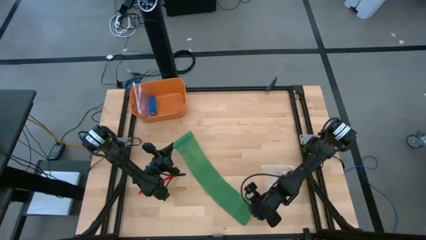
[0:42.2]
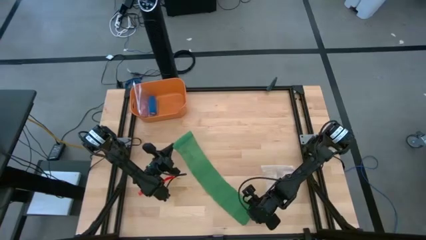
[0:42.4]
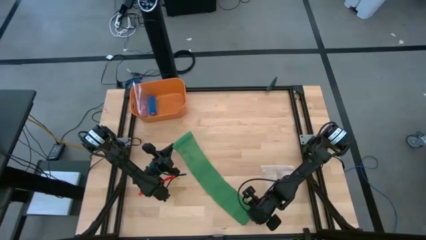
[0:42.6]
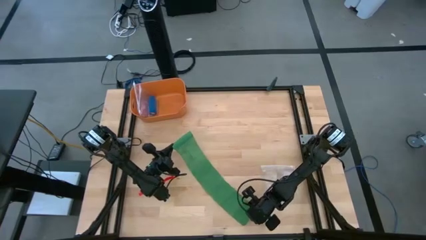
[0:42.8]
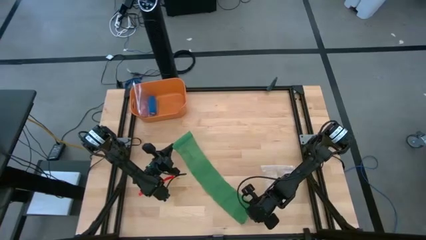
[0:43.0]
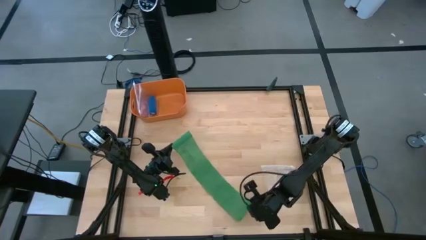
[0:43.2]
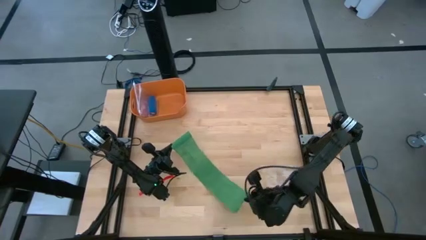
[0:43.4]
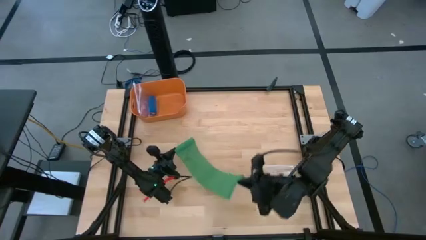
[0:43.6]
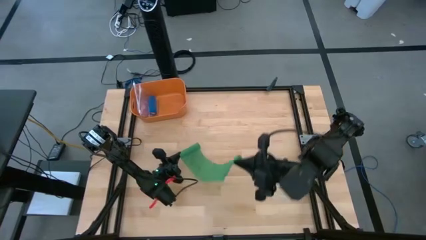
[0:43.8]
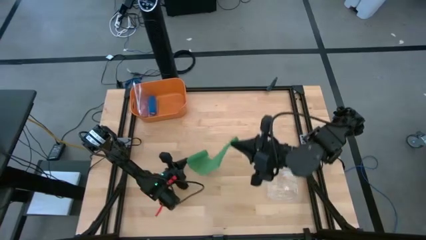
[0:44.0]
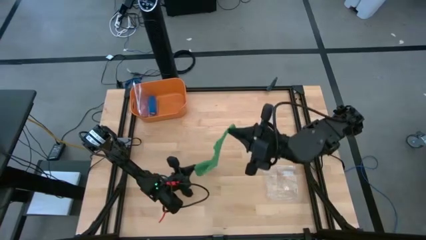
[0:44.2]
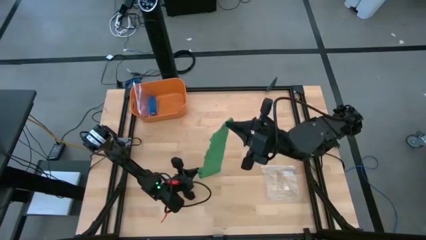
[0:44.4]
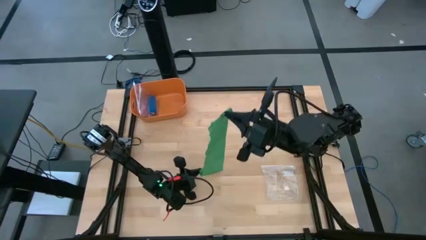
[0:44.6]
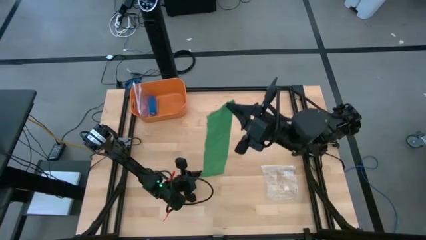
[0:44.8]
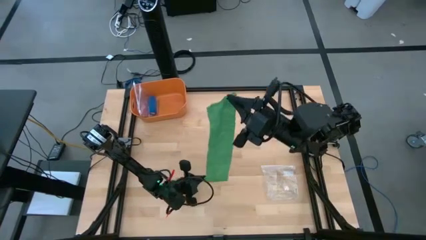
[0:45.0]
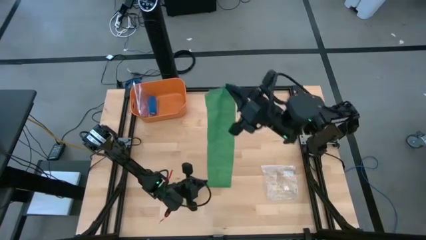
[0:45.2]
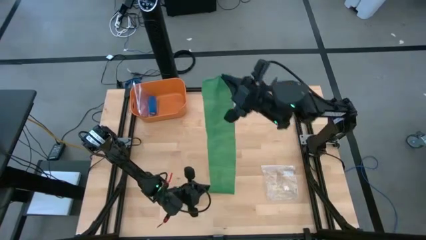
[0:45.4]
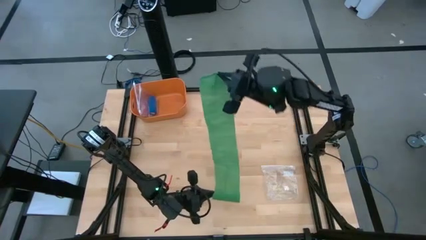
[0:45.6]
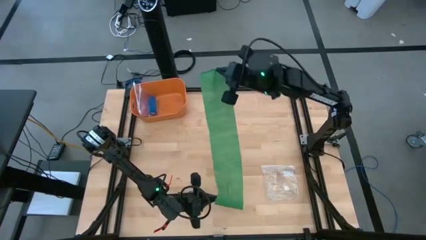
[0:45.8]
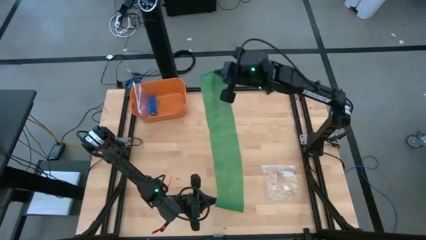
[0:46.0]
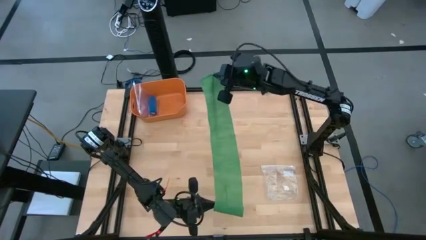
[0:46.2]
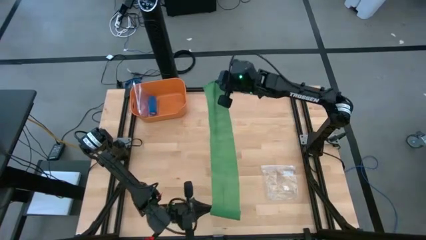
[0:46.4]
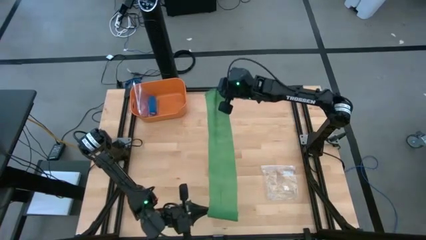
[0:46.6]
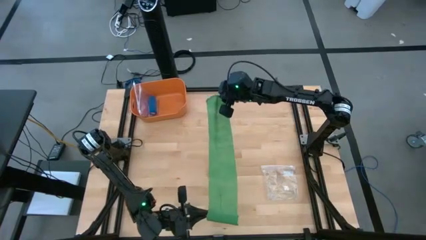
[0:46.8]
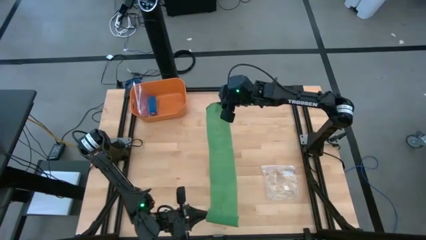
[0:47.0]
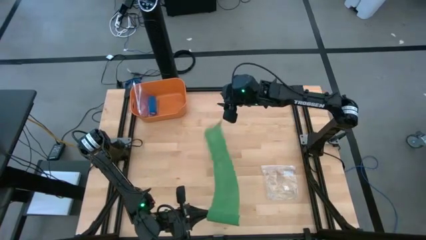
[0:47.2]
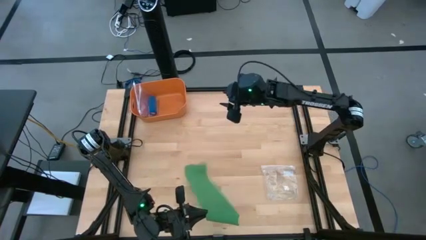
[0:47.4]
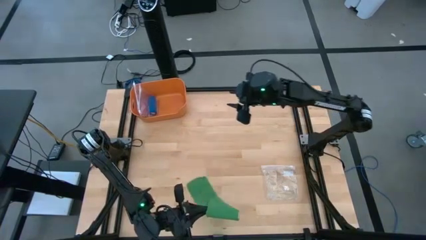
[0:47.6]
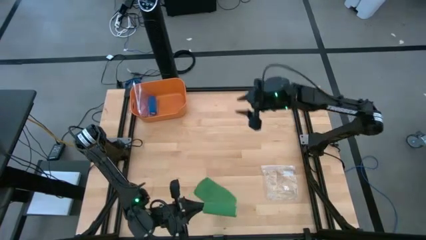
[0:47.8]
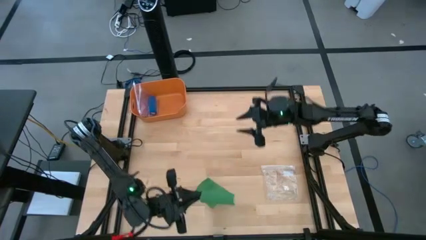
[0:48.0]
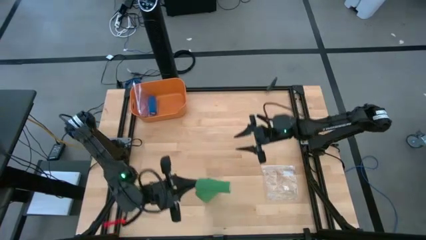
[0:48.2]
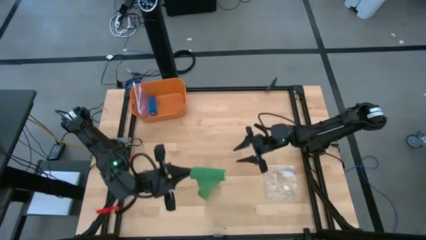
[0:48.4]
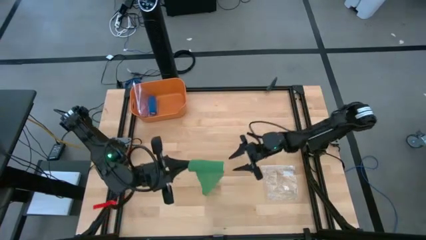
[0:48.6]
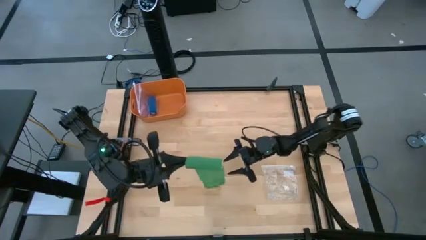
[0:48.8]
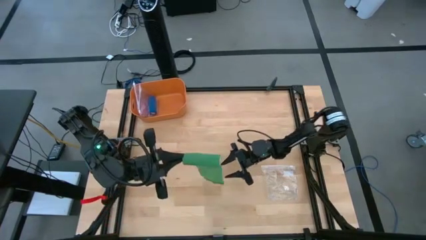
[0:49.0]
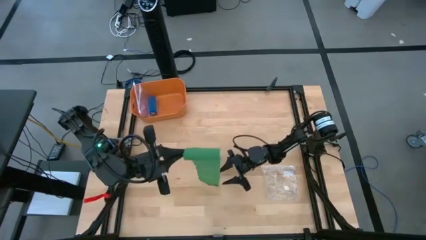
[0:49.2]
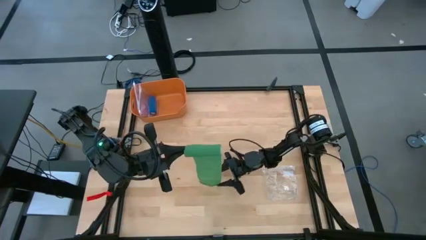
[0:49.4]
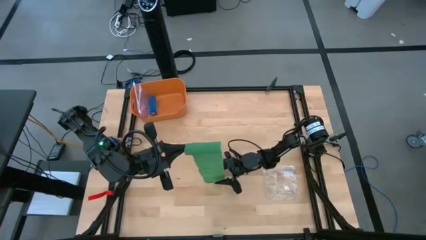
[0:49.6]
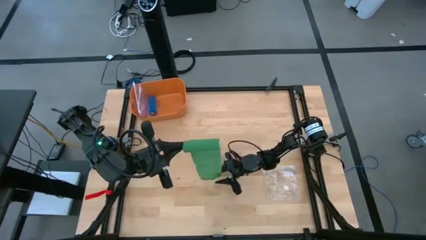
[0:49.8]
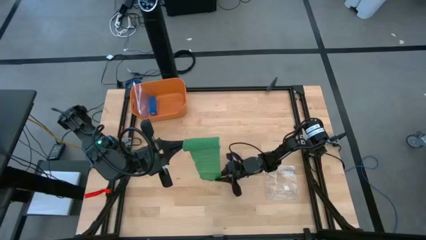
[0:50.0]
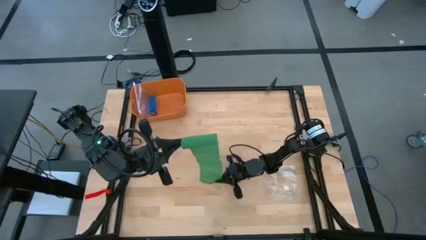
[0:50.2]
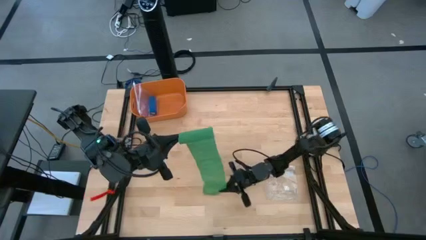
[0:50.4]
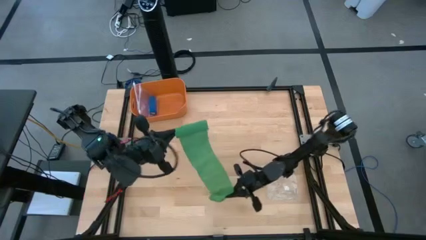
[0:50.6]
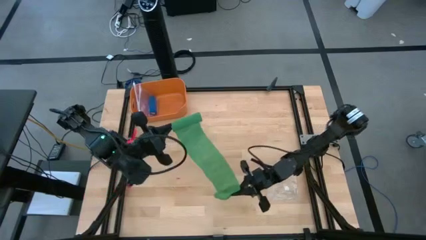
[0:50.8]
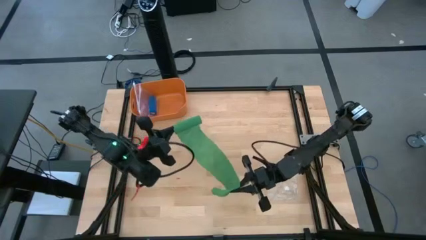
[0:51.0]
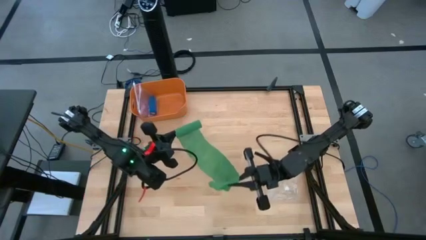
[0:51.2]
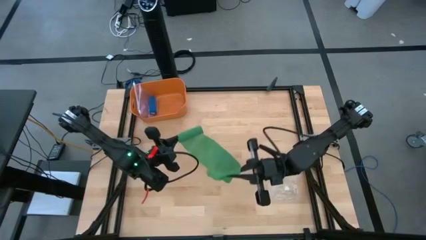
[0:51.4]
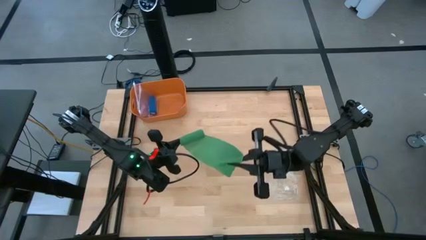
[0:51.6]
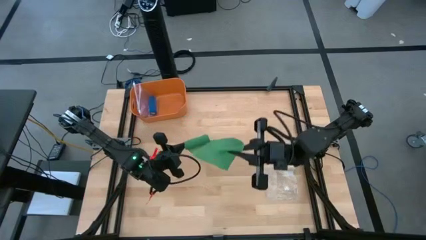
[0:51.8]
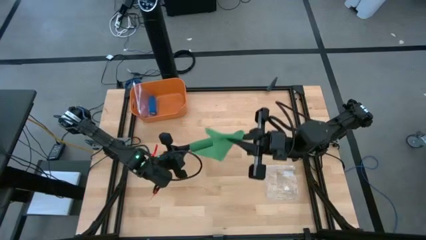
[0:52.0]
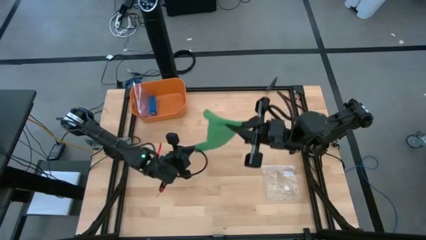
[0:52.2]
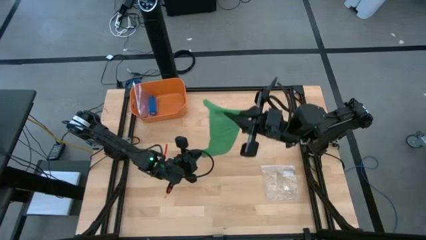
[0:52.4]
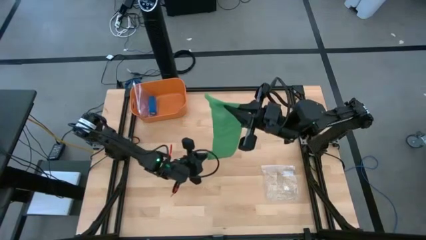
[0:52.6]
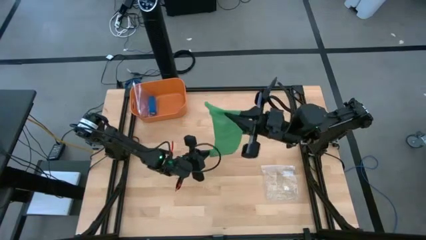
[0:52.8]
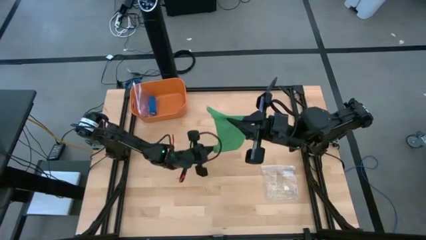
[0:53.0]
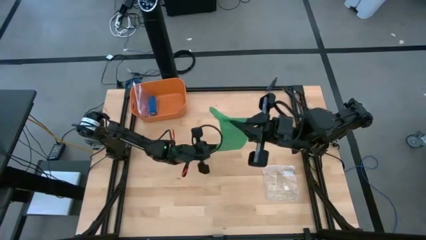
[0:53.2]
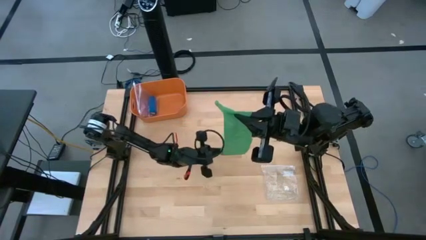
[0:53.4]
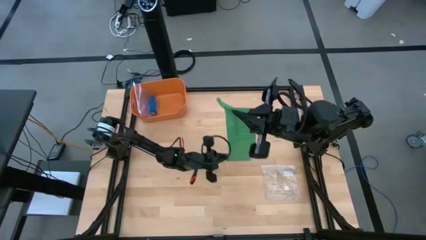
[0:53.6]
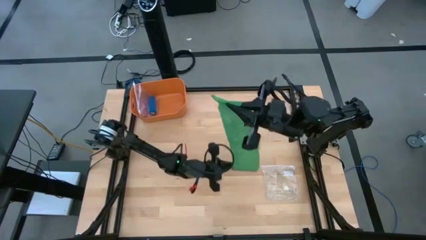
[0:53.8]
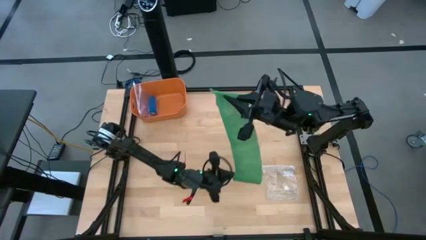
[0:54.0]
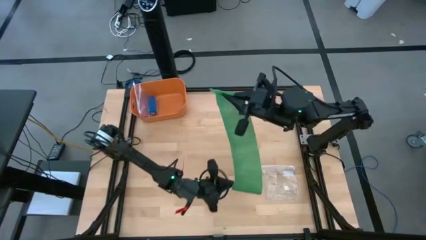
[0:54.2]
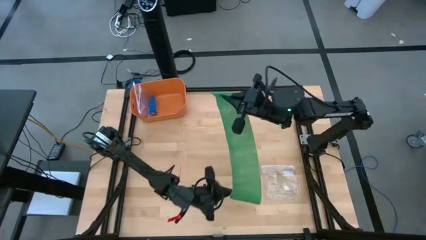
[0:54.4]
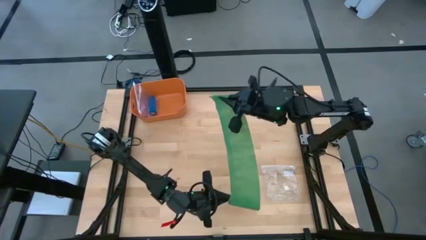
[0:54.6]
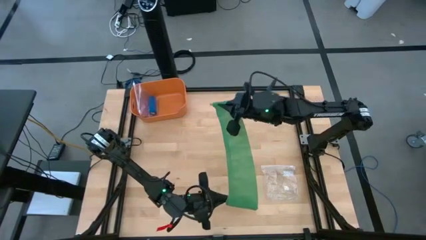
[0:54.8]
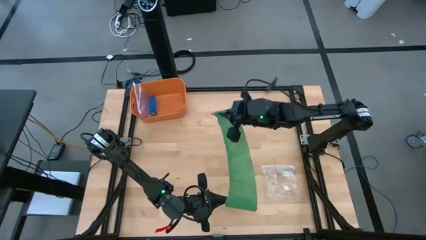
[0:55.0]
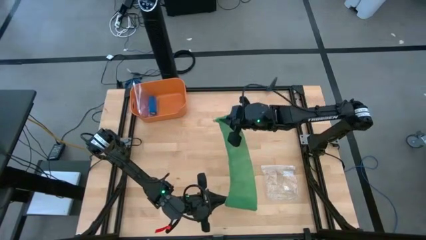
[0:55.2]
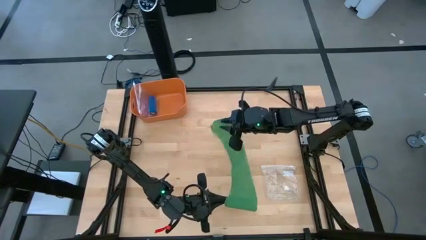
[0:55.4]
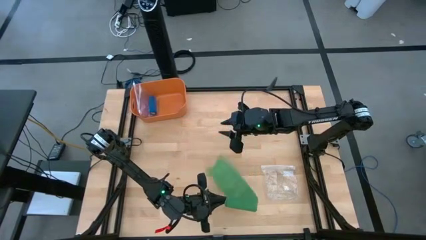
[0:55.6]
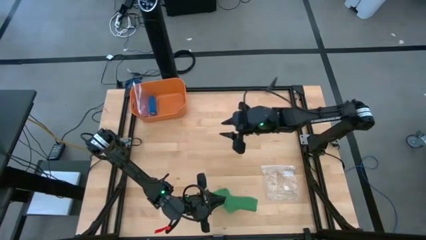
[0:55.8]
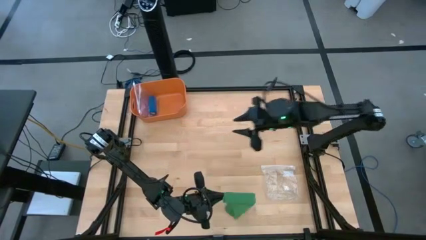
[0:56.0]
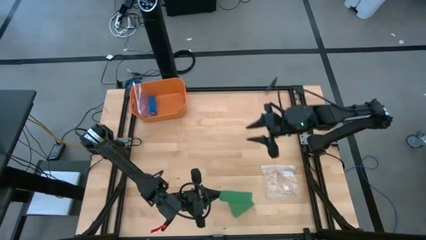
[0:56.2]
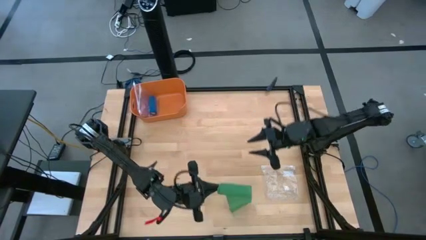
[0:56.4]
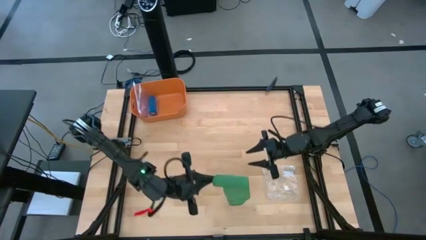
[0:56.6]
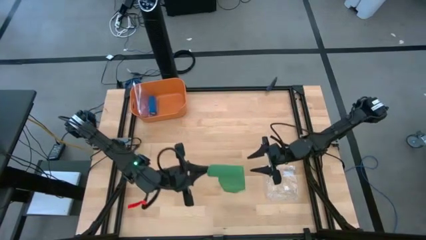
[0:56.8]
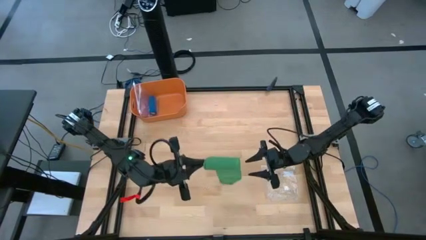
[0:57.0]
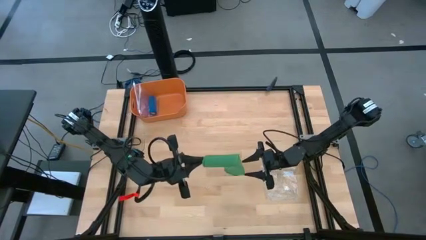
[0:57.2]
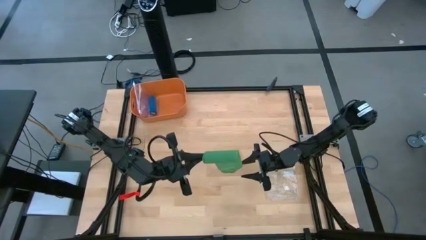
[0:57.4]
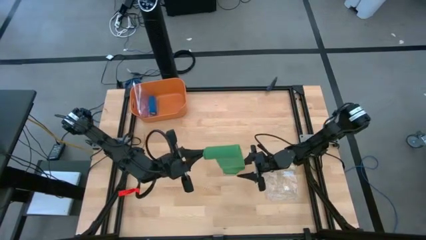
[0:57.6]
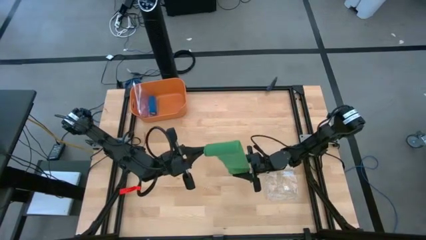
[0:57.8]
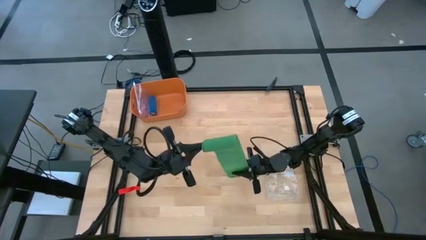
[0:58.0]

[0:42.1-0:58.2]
Task: Roll bandage
Roll the green bandage
